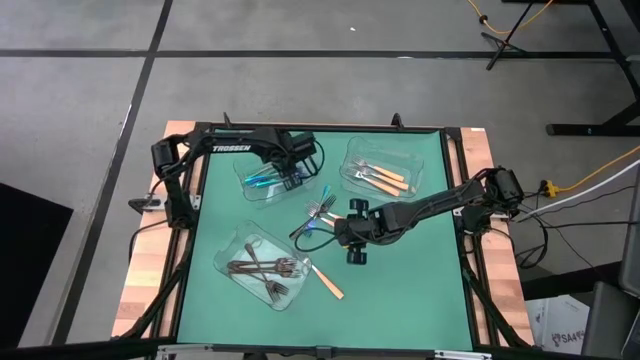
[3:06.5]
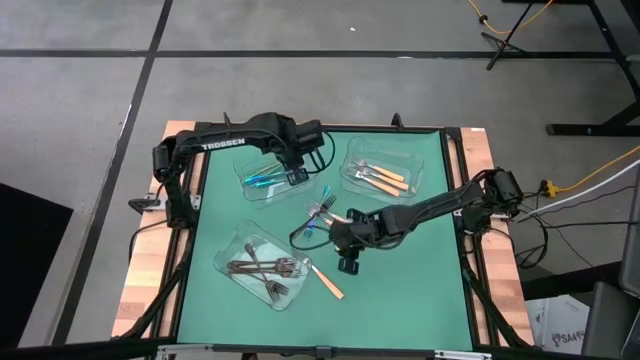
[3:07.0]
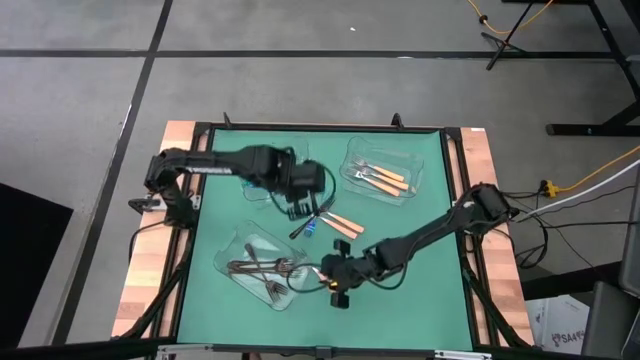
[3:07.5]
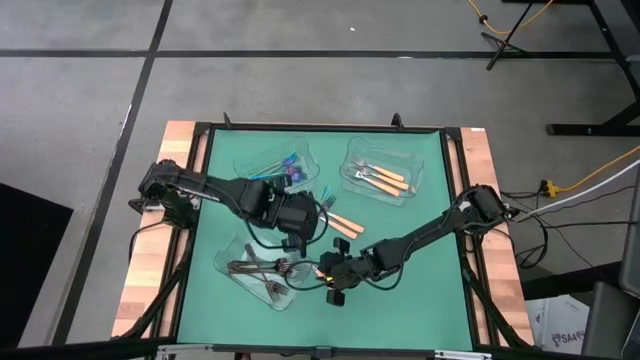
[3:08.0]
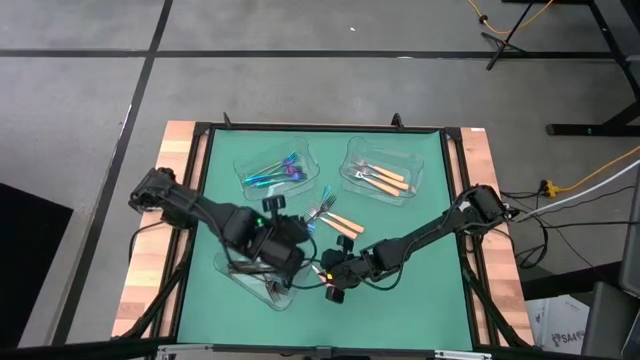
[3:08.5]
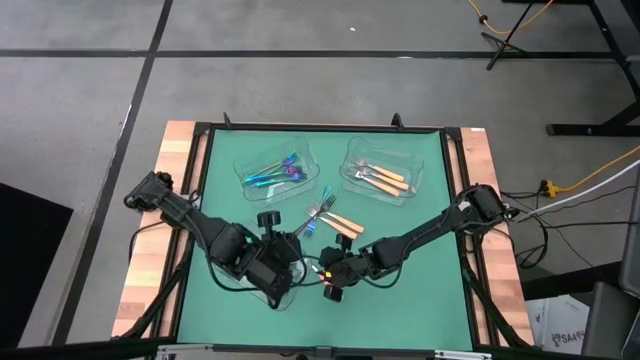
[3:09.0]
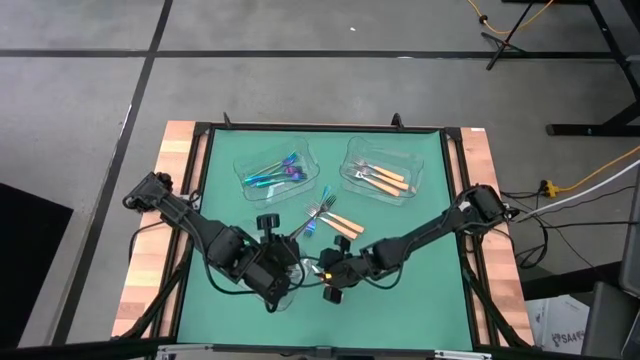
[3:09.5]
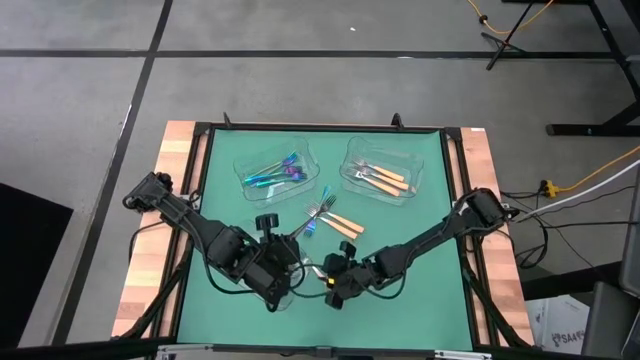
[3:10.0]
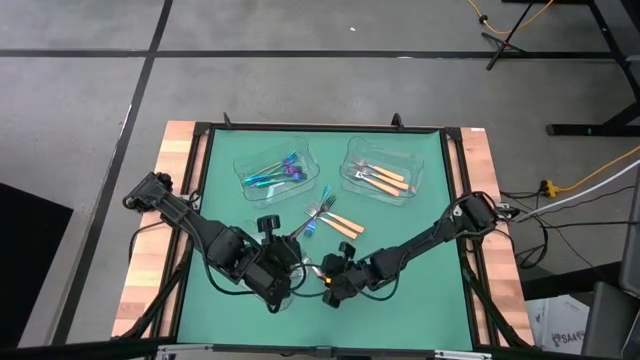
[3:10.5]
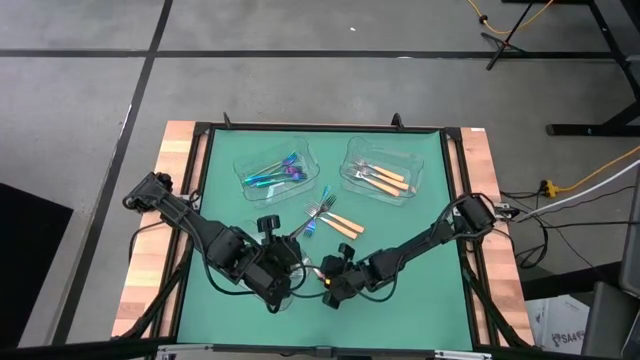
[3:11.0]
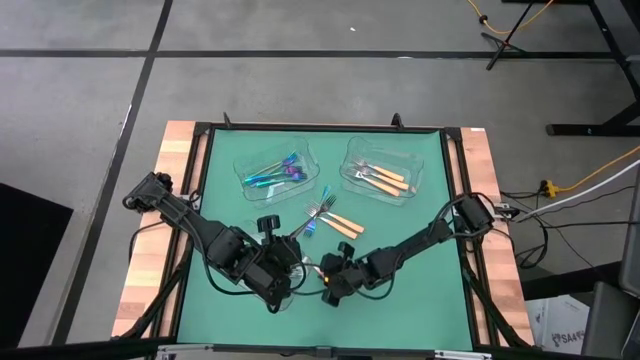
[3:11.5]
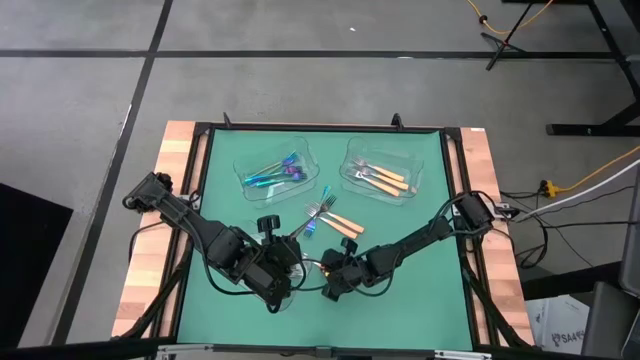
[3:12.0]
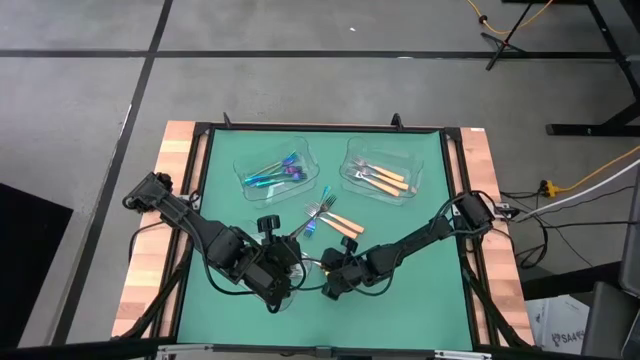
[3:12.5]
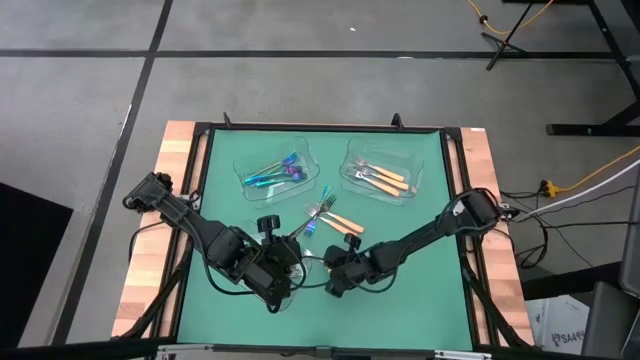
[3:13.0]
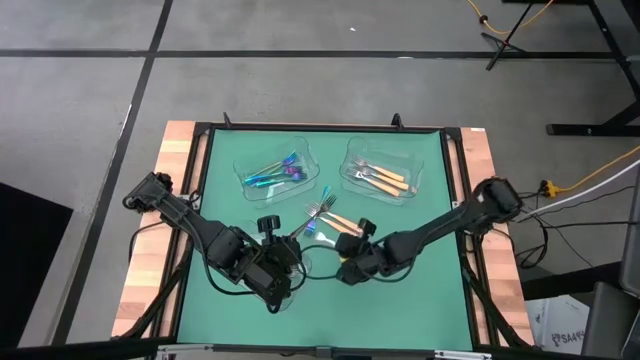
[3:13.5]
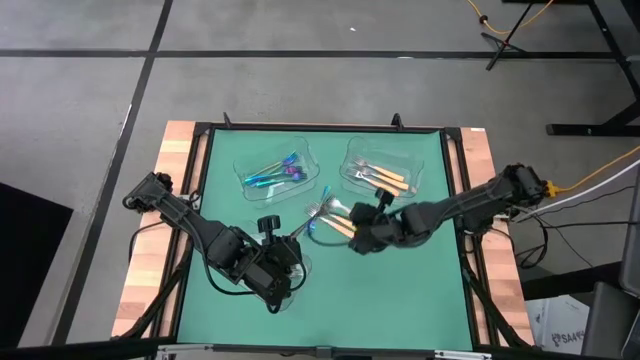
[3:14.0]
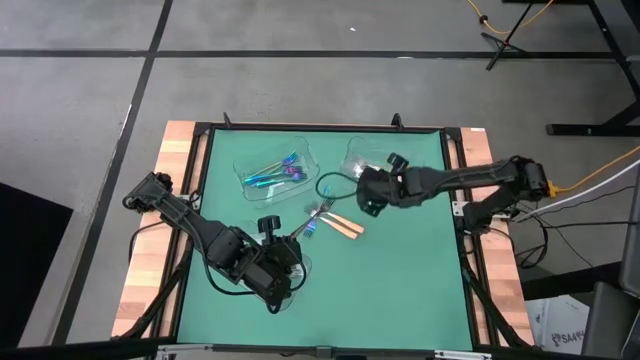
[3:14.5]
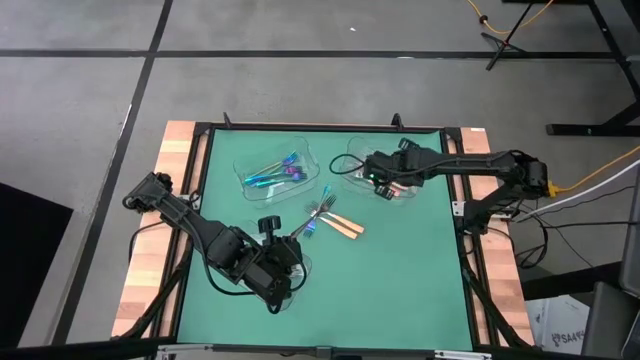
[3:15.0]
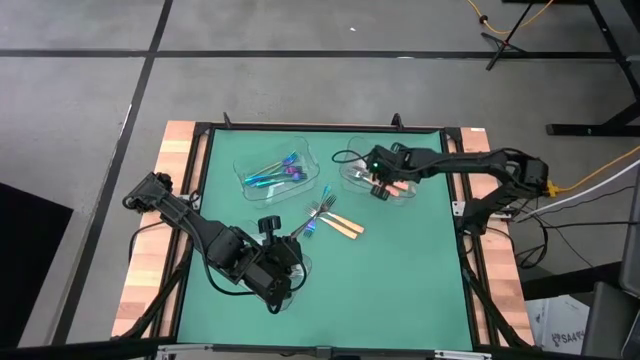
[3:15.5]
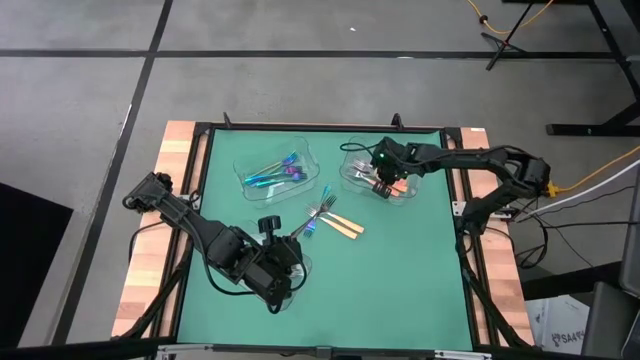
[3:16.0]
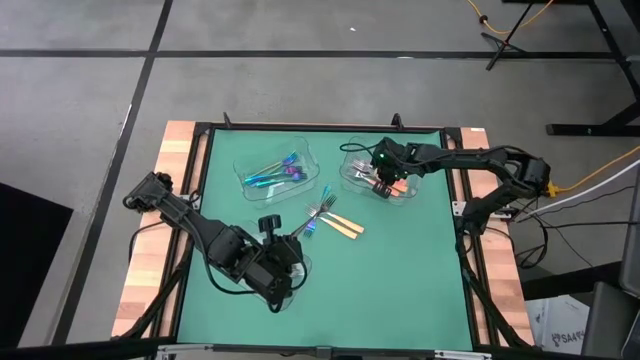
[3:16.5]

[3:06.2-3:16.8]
Task: Sort silverware by color (type)
Put the yellow fork into the top right transparent bin

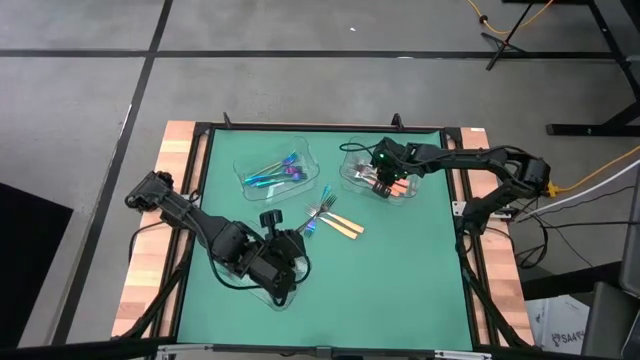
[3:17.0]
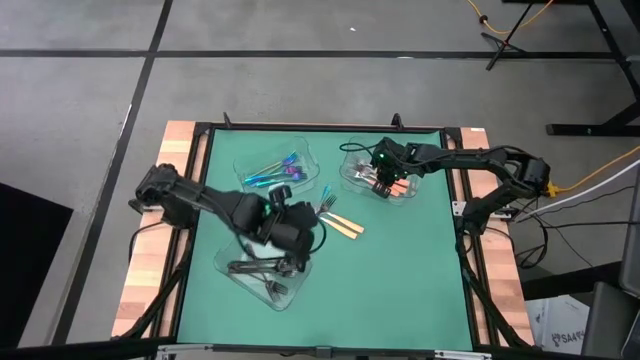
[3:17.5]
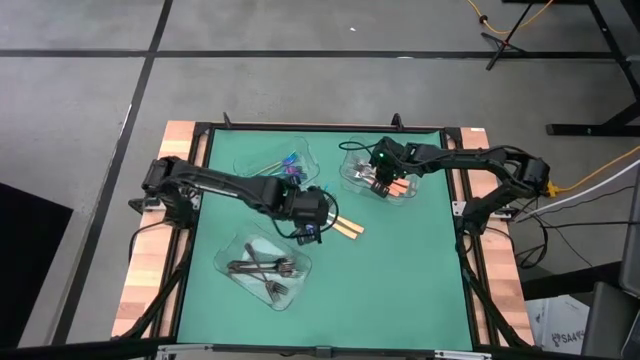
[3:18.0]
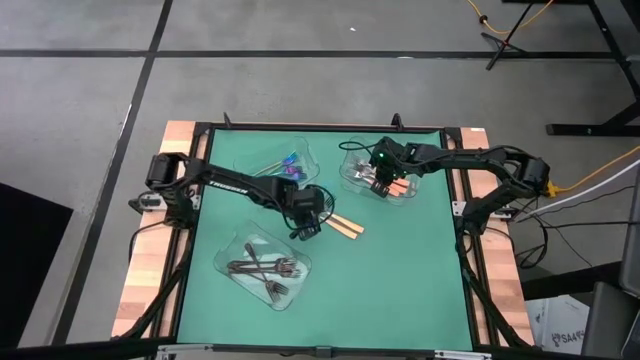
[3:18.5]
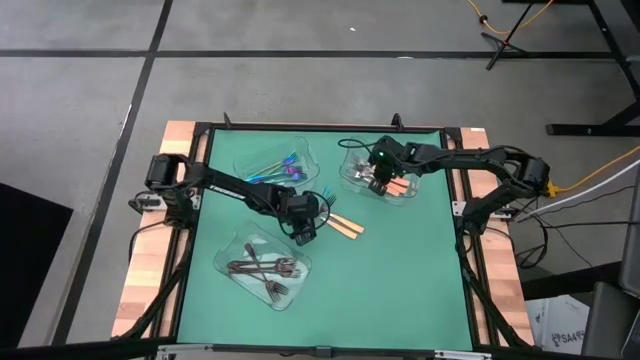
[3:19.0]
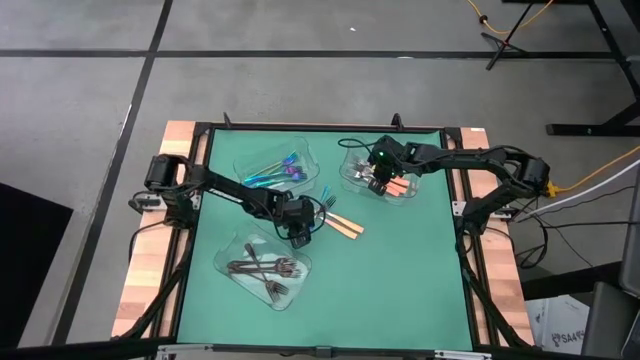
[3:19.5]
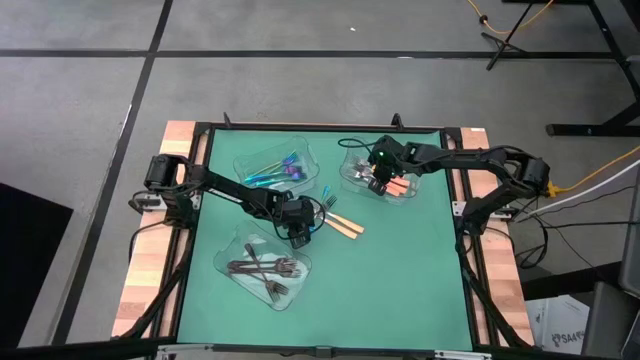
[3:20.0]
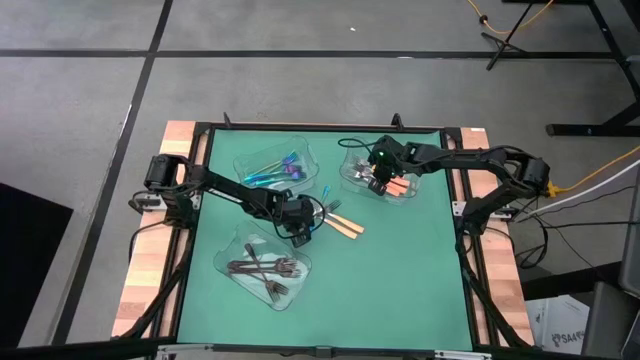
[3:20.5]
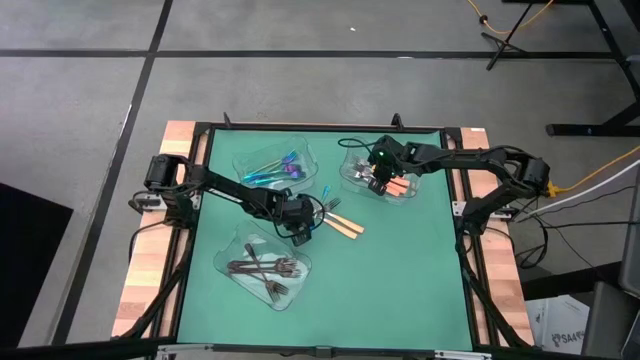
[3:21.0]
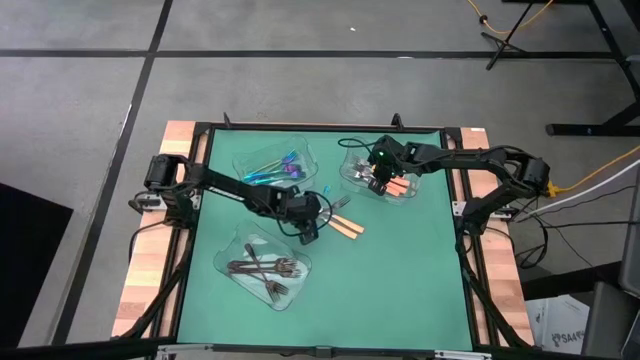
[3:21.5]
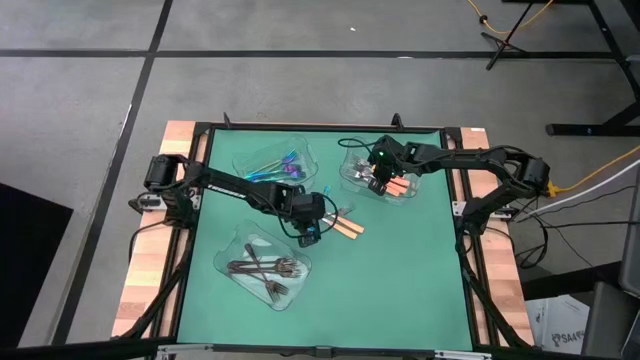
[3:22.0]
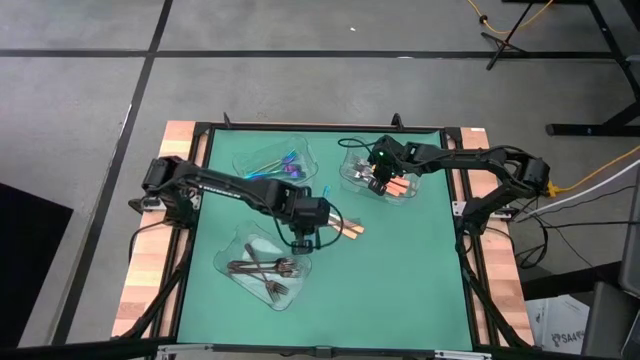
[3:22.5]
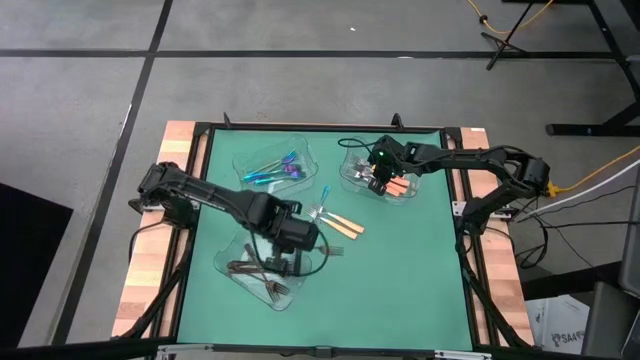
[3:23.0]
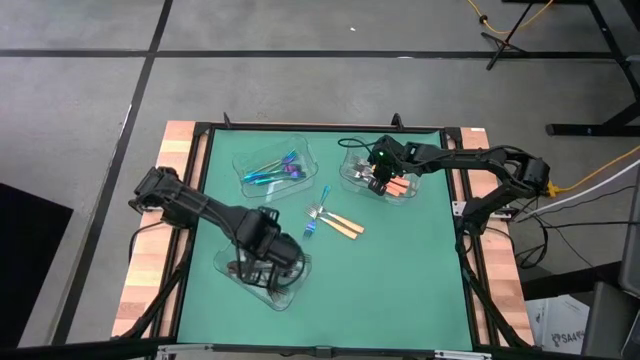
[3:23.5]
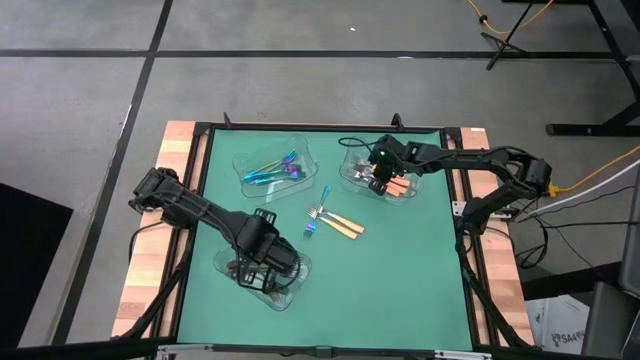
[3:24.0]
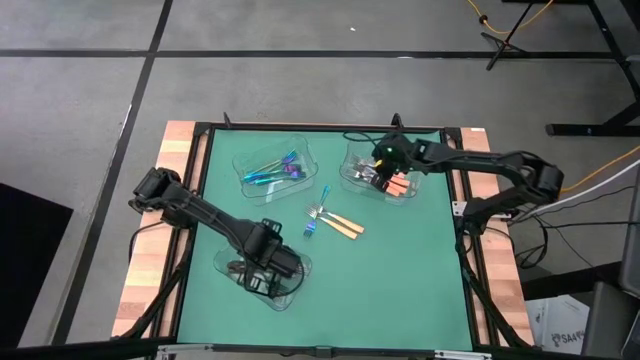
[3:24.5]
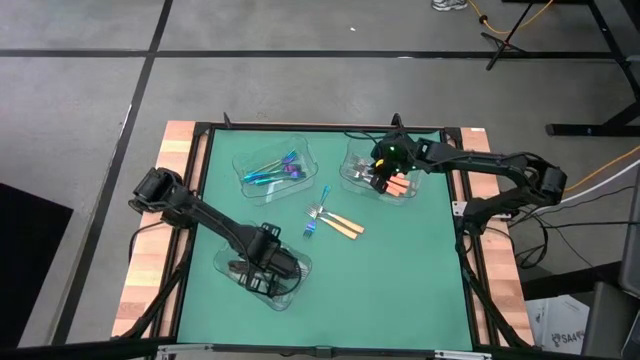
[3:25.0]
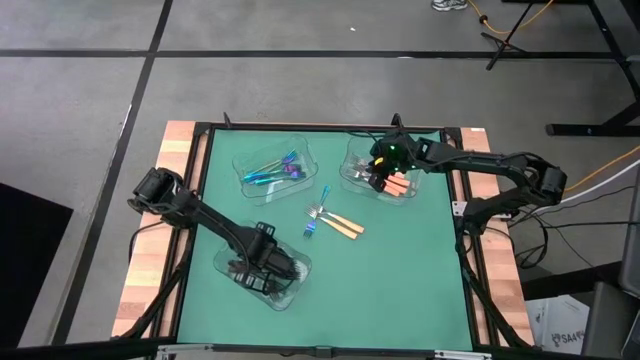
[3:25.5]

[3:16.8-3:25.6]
Put the black fork into the bottom transparent bin
